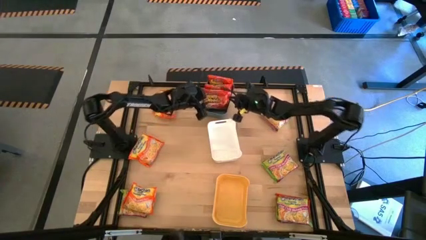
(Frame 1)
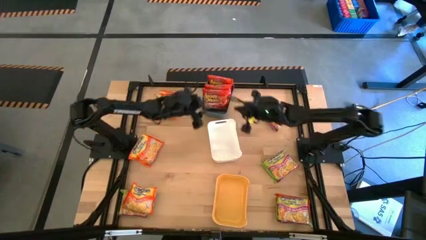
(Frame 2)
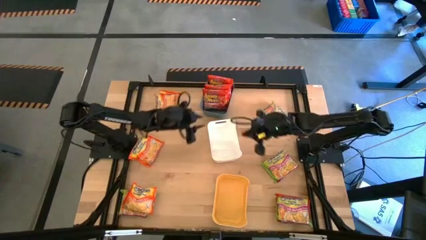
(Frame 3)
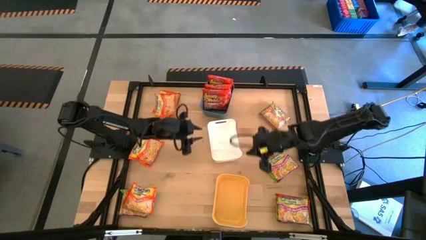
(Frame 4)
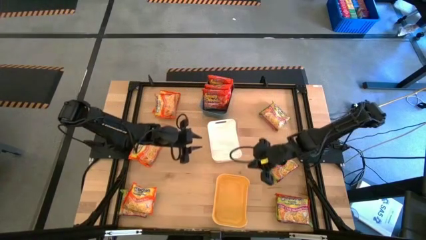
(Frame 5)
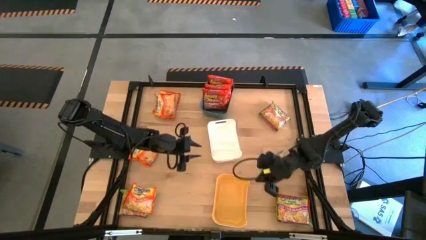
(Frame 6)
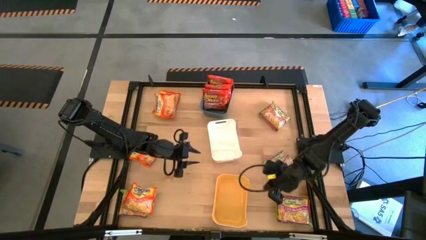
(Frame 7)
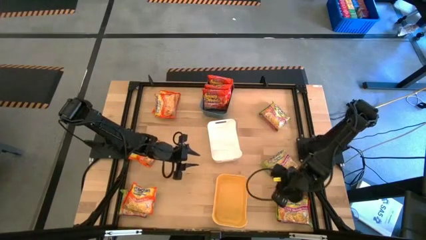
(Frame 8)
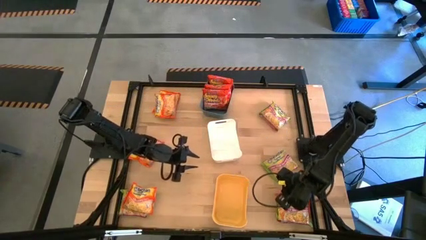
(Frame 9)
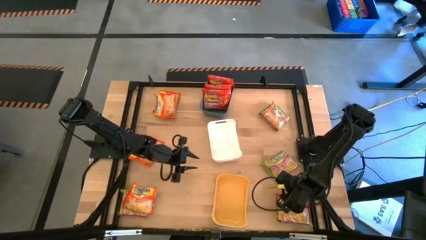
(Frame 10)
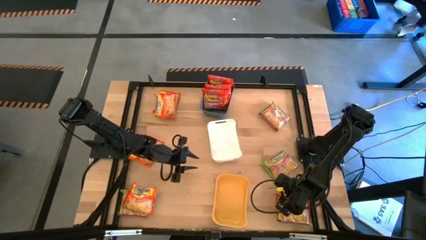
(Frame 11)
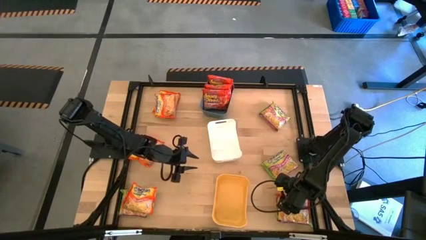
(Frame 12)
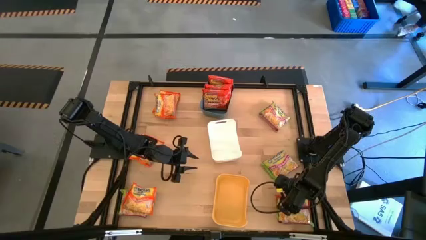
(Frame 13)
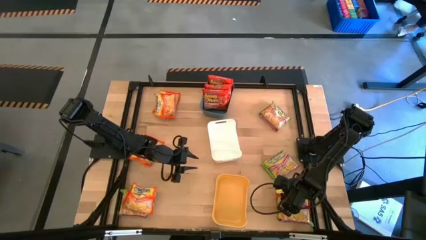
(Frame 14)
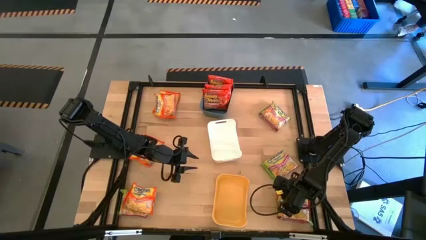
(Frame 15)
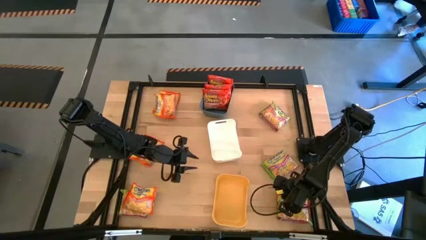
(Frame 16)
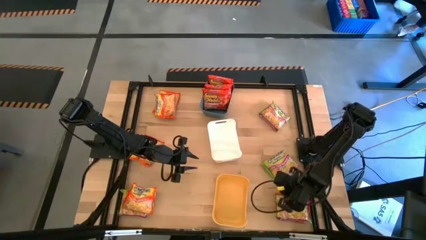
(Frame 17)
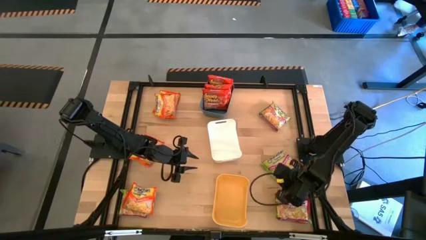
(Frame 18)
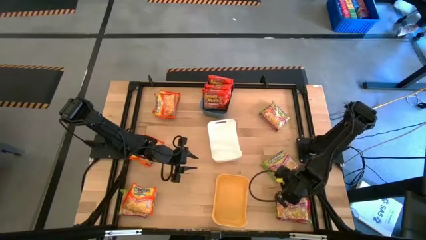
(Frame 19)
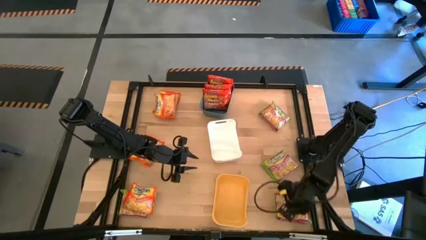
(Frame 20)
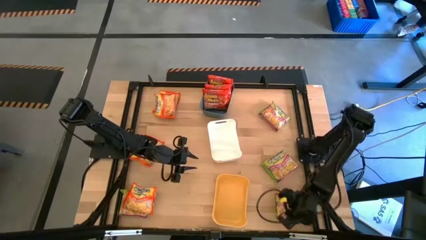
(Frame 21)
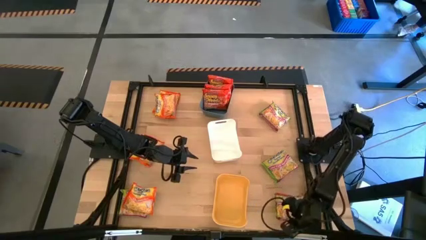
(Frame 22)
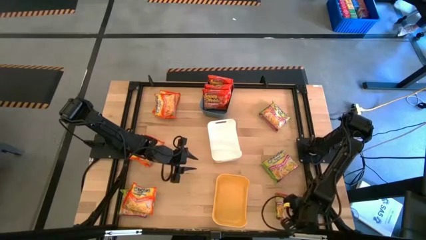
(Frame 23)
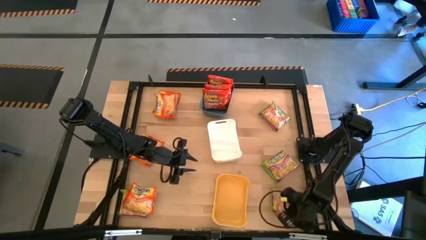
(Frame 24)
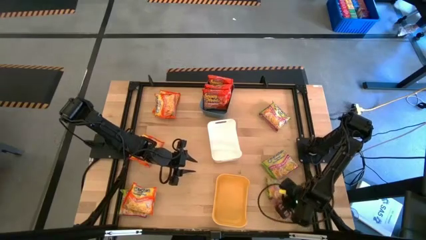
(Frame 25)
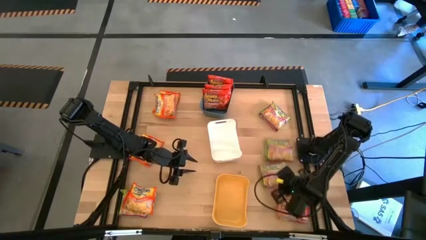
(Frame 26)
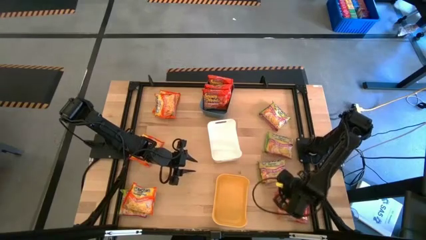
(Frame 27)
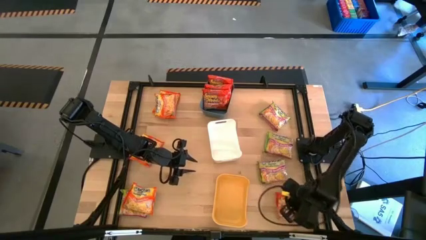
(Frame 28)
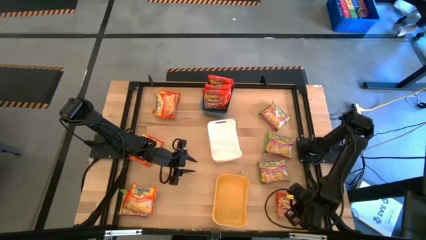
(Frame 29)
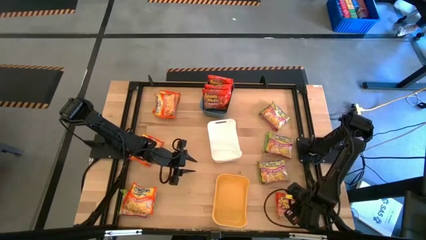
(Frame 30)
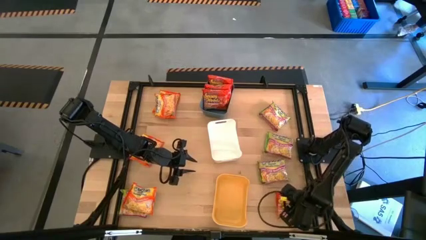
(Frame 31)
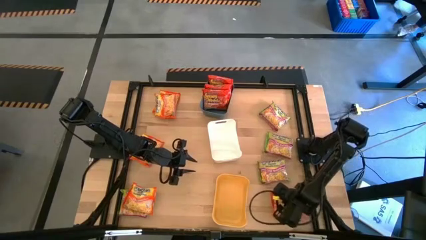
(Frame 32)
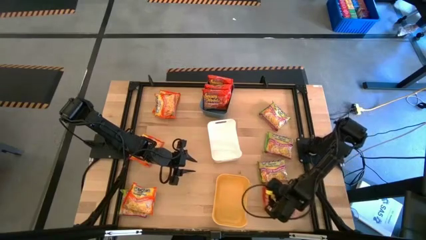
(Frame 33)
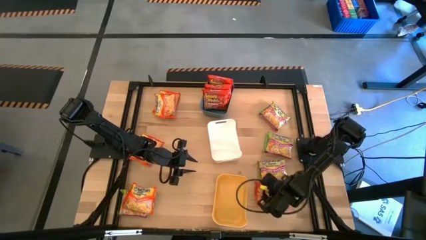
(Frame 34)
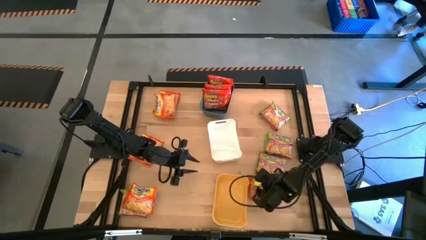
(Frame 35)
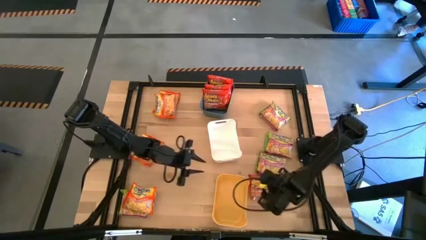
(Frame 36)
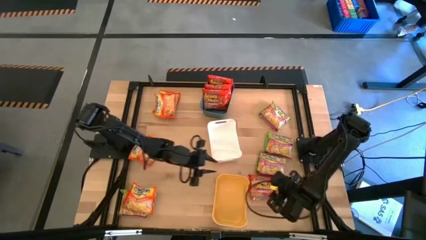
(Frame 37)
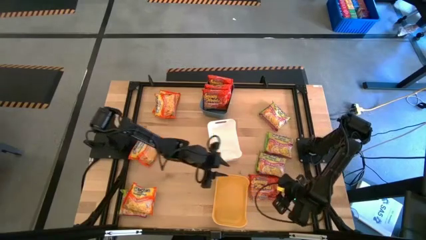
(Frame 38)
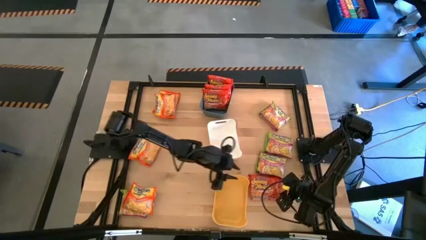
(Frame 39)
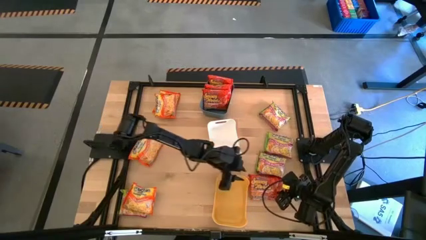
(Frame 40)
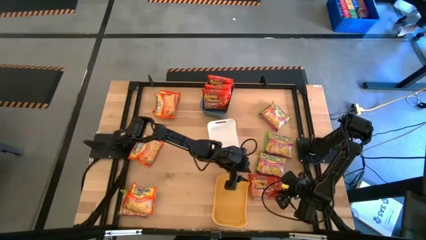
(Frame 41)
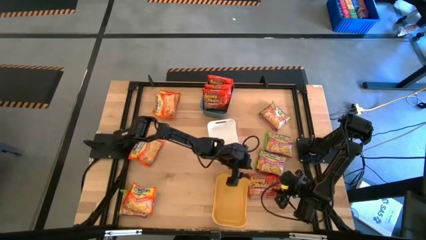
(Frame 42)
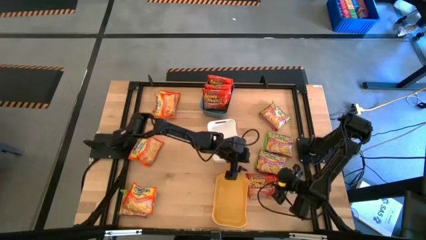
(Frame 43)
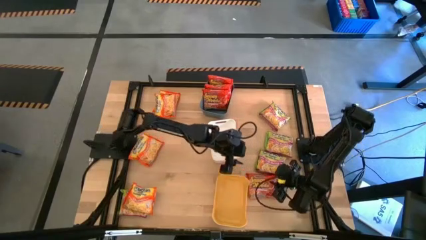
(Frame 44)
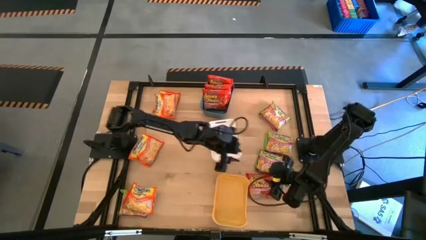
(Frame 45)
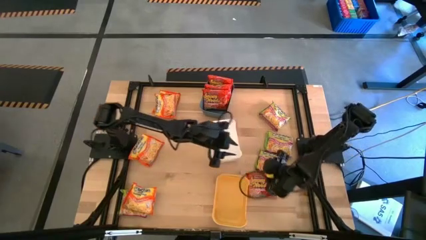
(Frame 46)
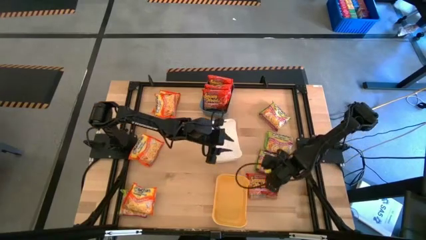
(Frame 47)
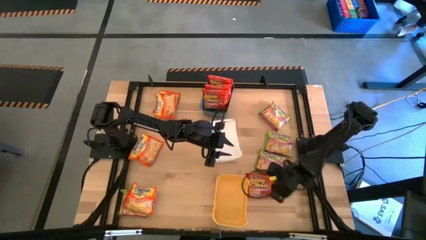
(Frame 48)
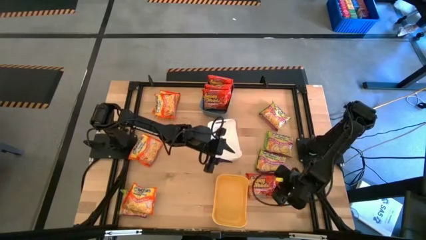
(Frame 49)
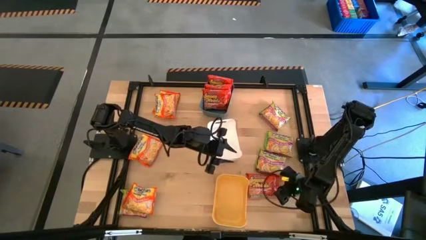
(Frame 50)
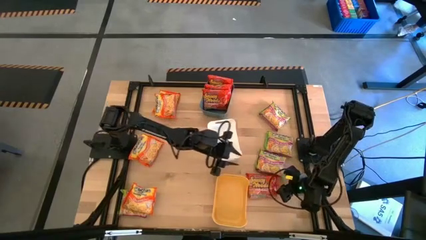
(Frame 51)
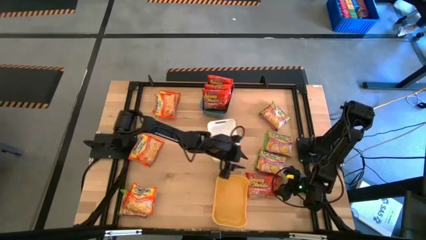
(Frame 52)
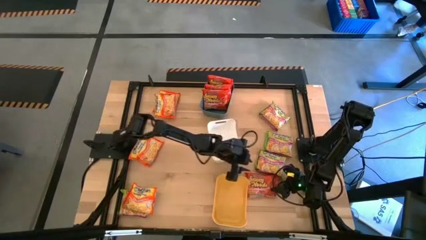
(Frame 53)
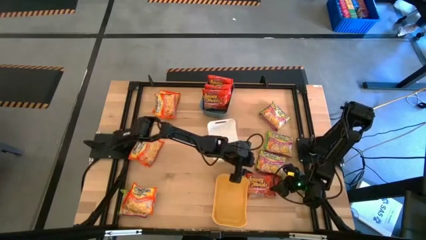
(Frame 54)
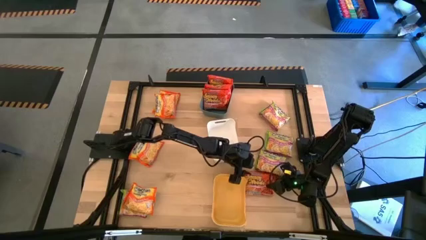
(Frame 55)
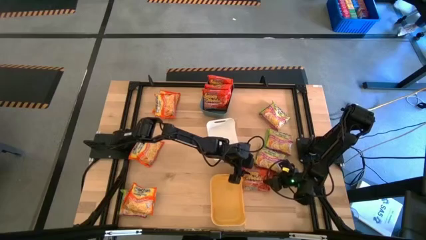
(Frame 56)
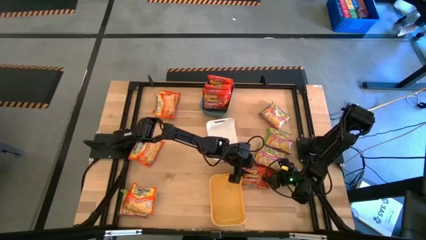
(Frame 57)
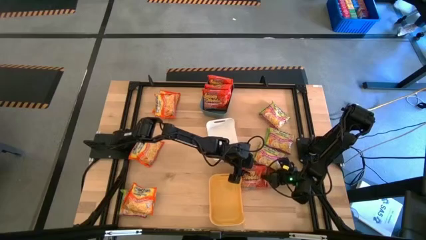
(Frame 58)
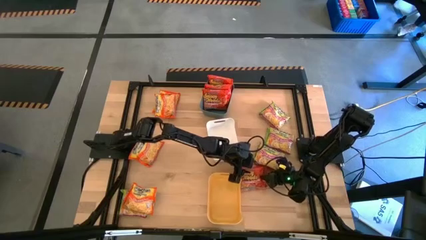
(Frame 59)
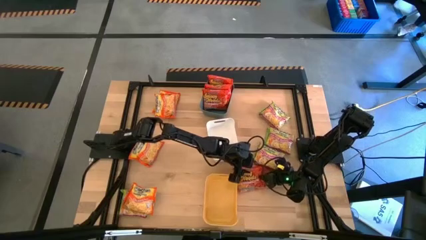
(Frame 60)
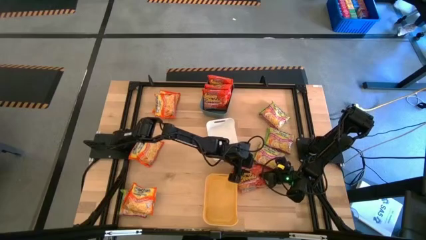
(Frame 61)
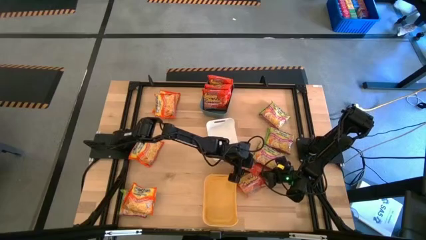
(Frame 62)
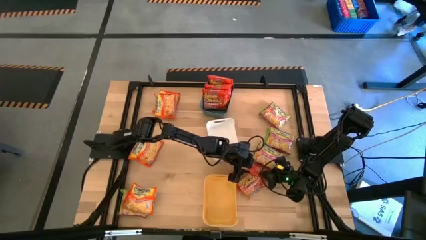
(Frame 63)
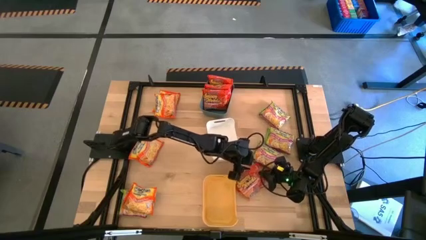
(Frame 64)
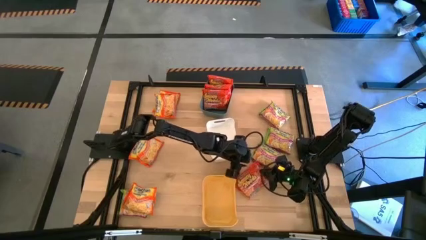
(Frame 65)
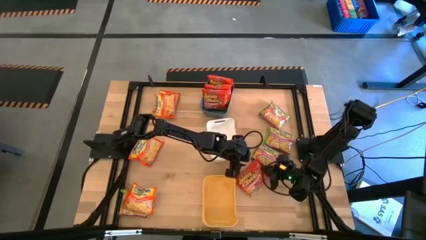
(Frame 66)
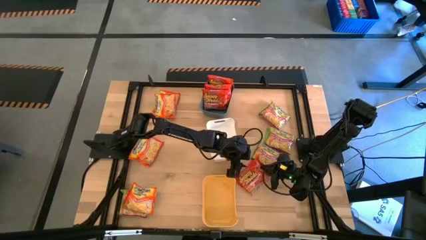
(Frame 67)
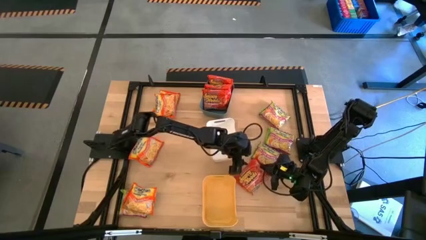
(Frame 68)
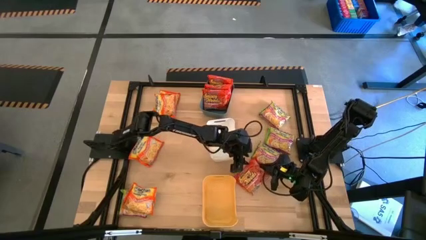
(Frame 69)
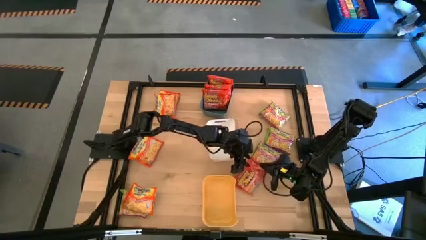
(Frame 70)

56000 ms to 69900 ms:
Task: Sort Maruchan noodles
Put the red noodle pack into the blue bin
